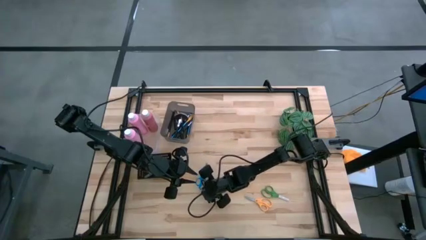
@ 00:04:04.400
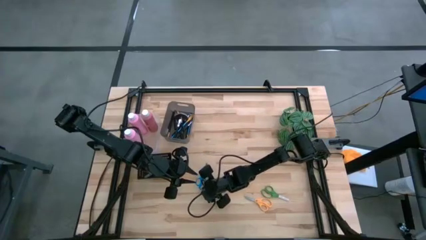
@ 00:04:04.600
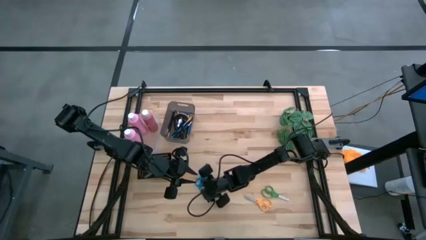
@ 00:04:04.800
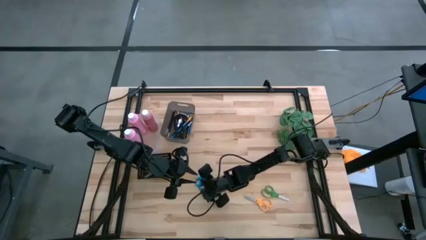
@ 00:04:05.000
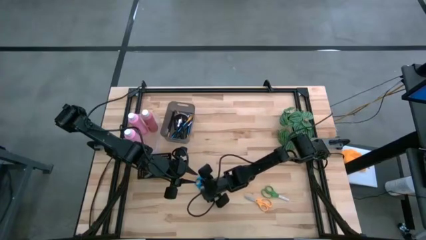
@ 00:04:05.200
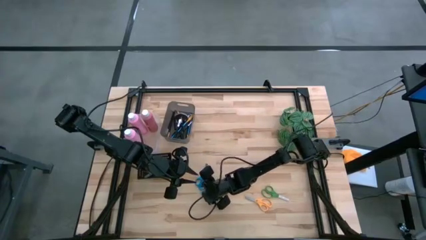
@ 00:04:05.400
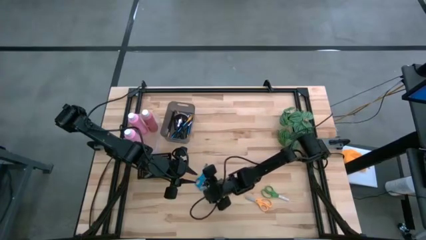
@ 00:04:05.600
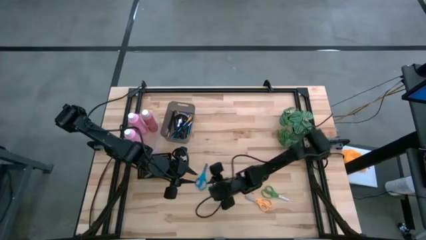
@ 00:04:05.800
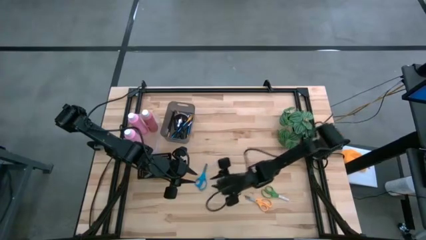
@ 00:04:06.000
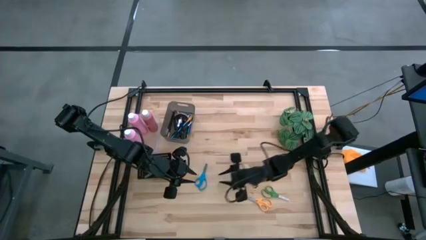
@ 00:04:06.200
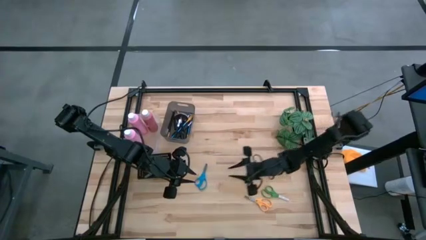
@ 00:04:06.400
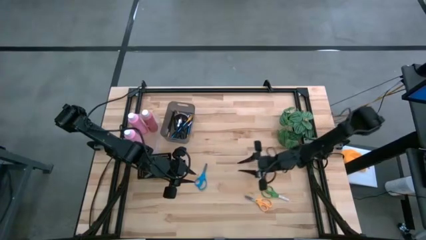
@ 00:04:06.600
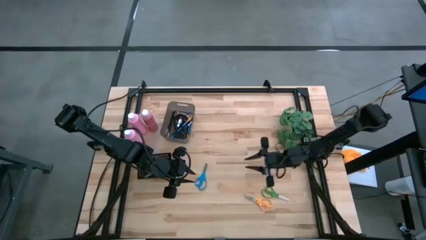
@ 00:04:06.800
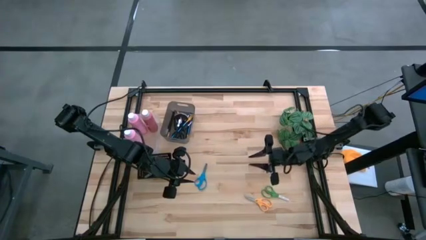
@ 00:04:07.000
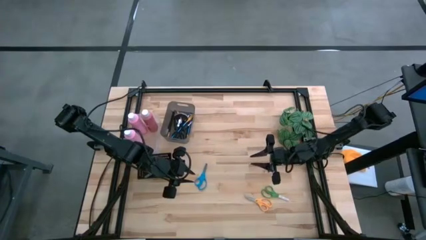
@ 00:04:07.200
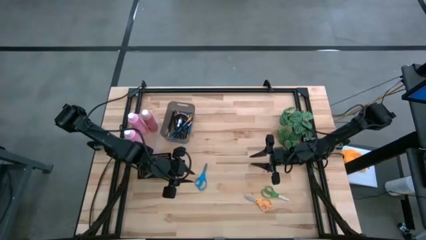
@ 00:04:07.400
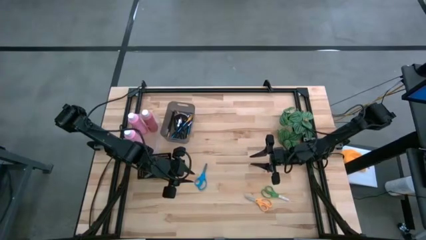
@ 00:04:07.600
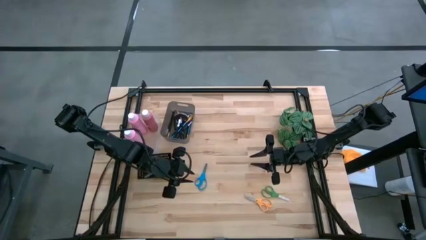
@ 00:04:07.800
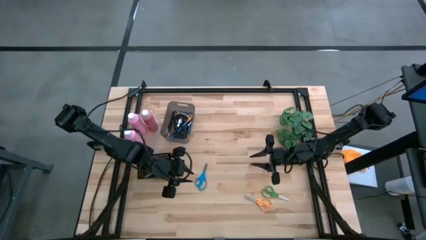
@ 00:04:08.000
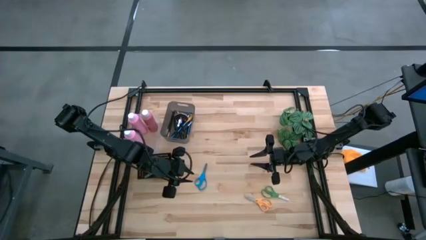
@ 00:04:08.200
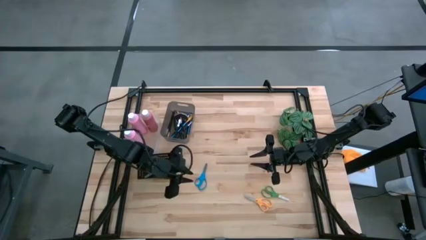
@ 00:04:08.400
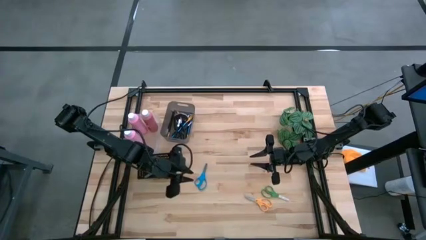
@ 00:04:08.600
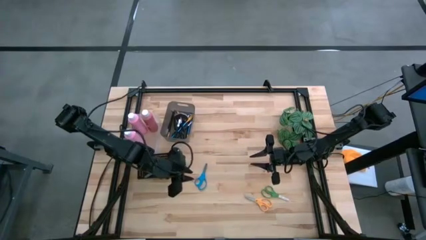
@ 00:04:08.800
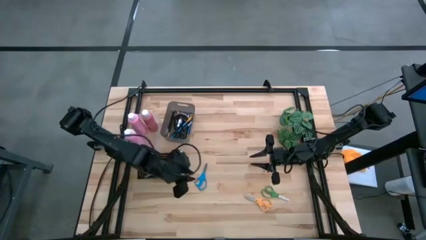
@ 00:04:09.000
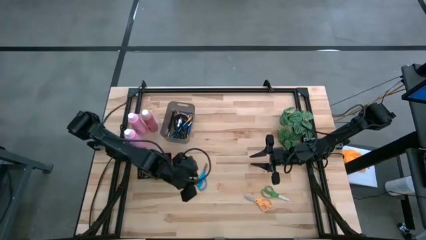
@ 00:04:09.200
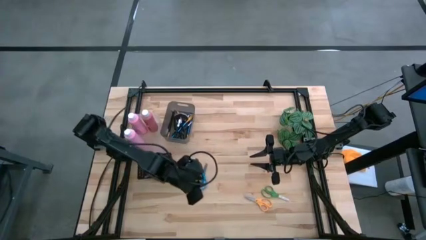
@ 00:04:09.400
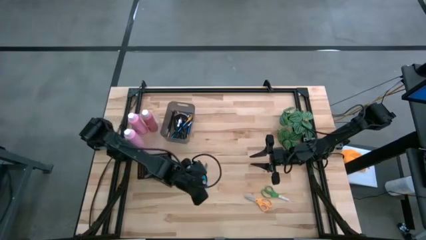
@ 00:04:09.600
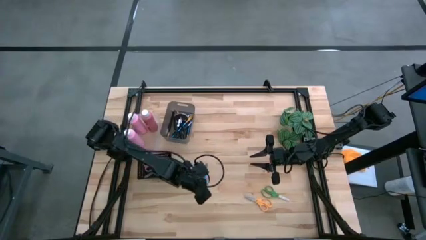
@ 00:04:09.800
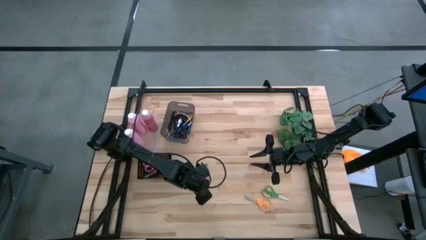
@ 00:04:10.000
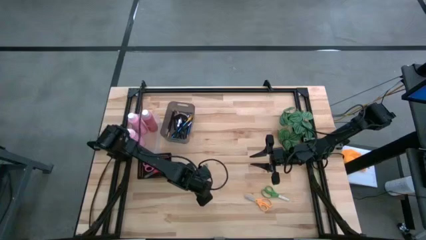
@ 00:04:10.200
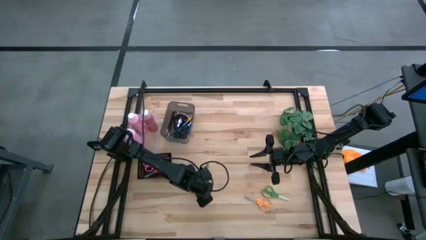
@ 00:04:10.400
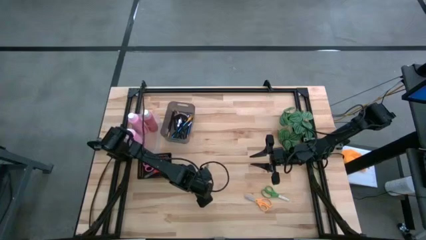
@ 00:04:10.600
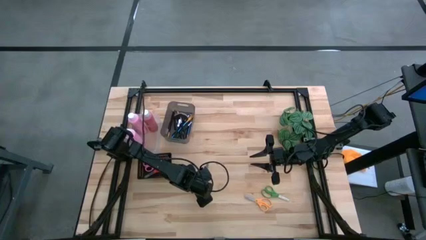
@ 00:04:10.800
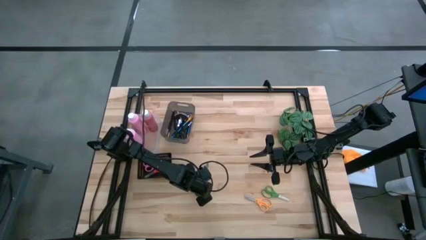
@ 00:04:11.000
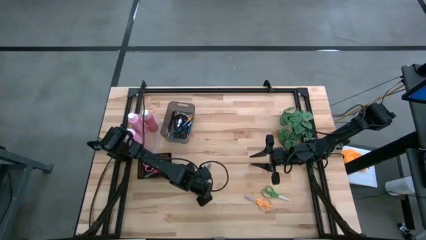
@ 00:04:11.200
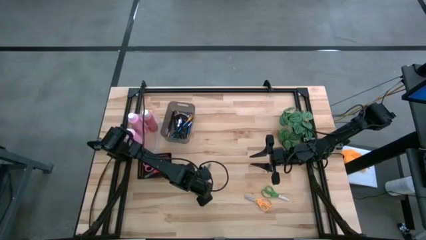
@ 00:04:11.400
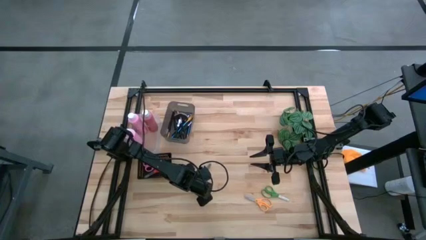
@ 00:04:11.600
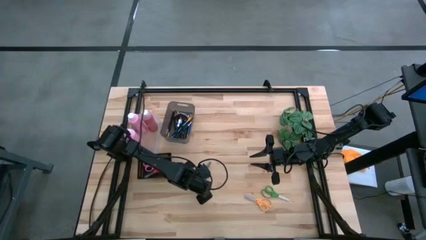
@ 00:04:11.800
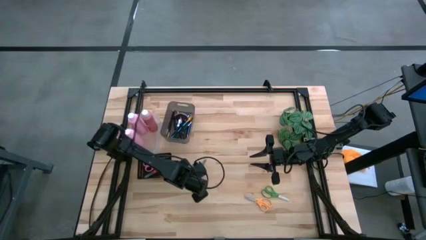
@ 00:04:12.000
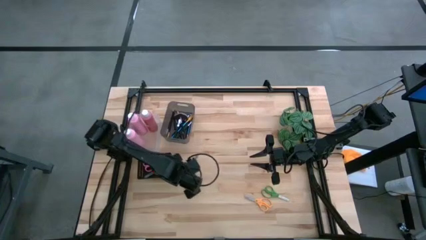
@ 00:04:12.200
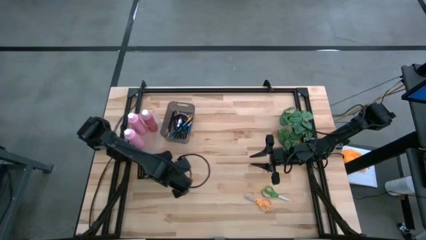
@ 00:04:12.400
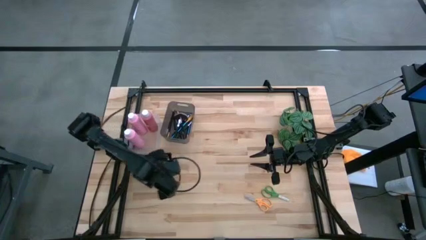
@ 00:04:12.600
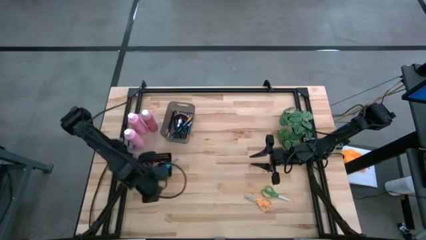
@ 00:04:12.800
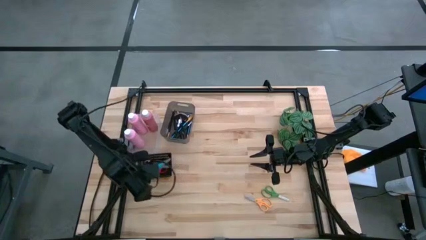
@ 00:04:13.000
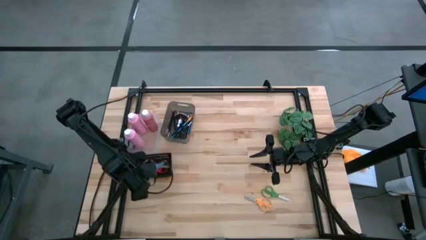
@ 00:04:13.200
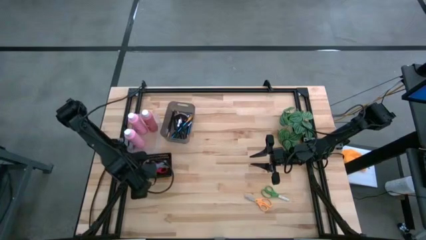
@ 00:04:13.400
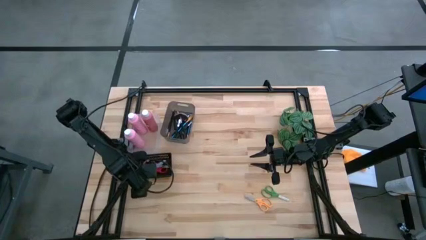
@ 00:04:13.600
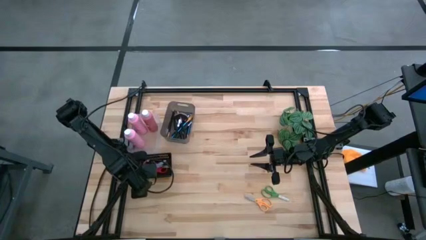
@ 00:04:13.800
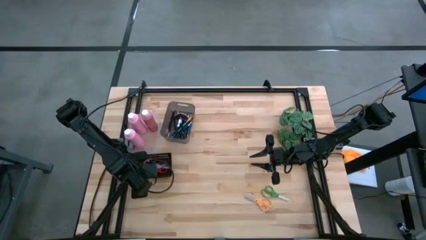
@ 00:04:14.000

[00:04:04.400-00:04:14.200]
Task: Pick & Place Paint Supplies
Put the blue scissors into the black basket
